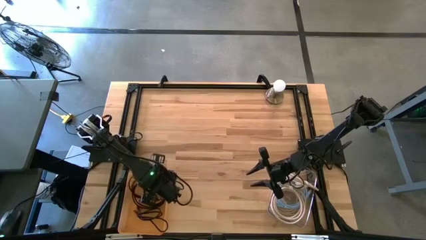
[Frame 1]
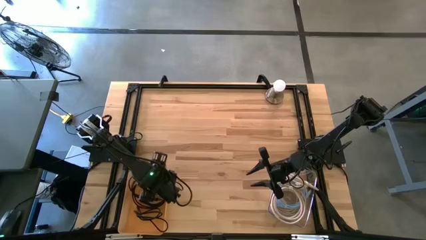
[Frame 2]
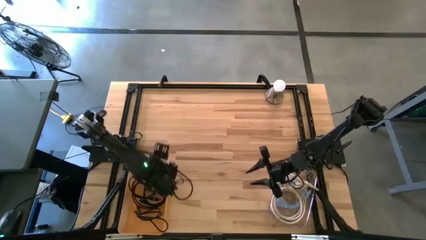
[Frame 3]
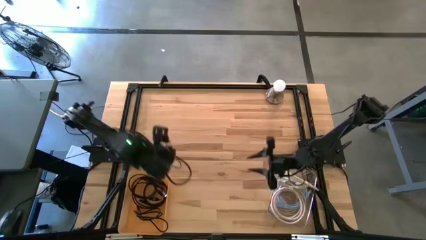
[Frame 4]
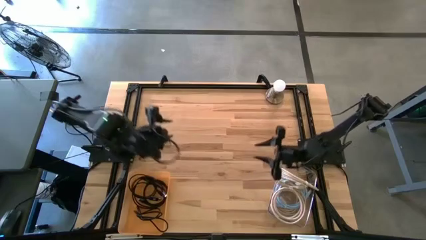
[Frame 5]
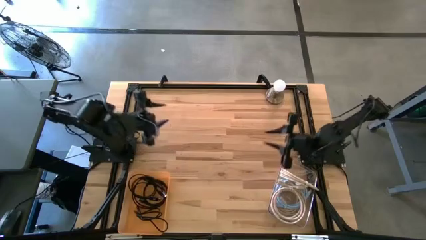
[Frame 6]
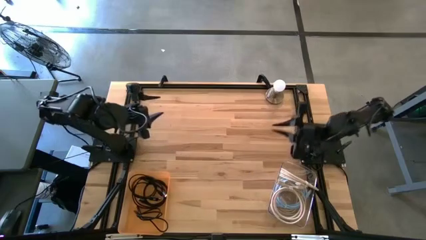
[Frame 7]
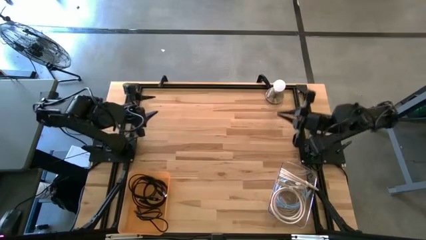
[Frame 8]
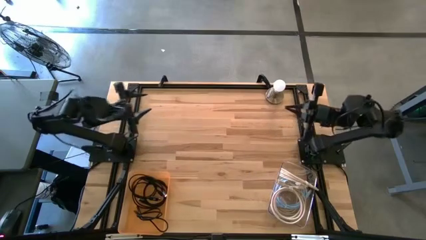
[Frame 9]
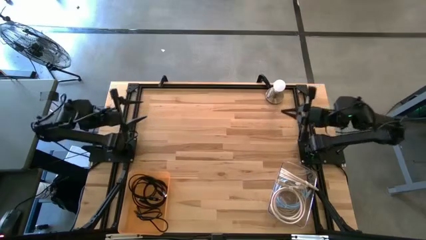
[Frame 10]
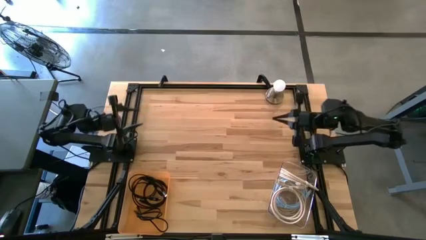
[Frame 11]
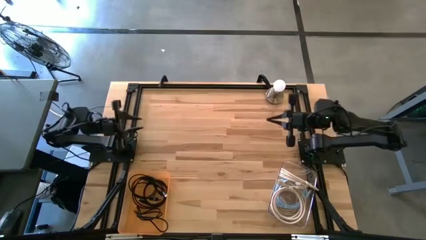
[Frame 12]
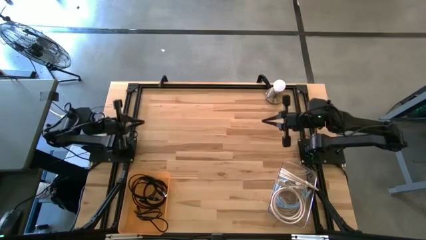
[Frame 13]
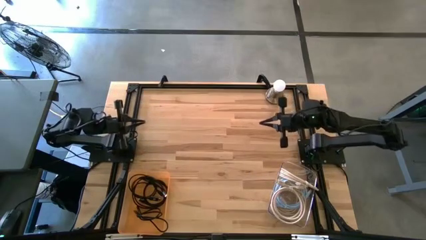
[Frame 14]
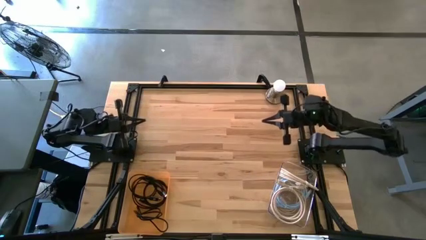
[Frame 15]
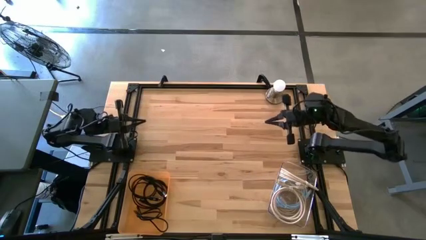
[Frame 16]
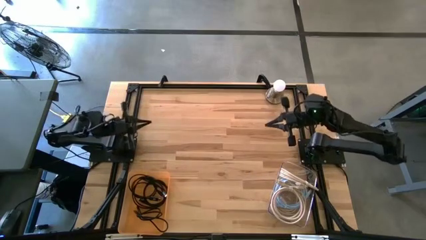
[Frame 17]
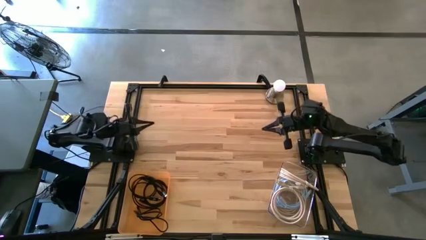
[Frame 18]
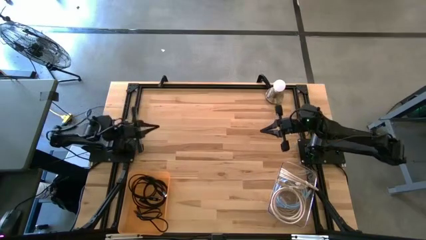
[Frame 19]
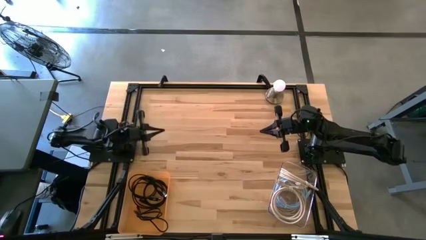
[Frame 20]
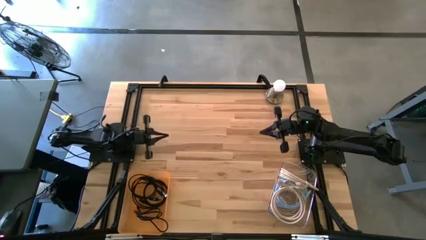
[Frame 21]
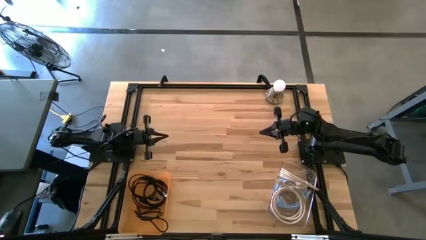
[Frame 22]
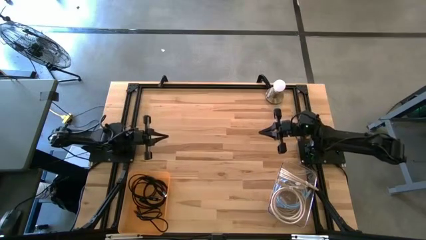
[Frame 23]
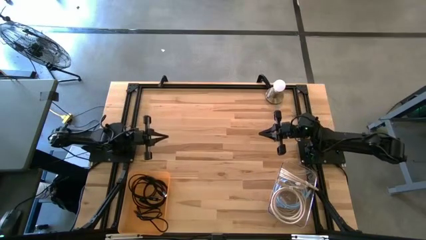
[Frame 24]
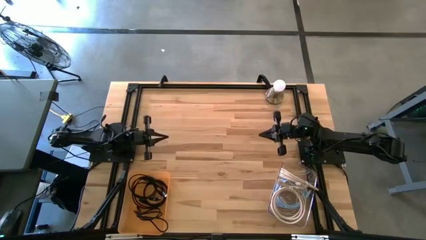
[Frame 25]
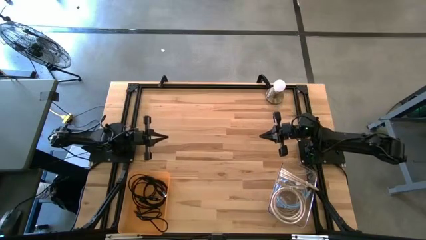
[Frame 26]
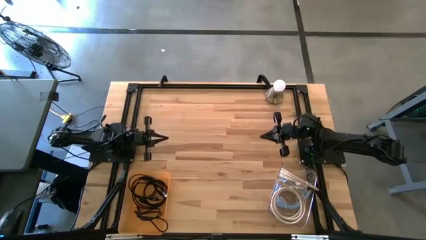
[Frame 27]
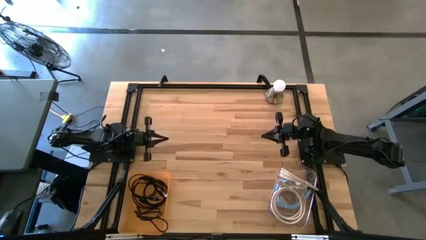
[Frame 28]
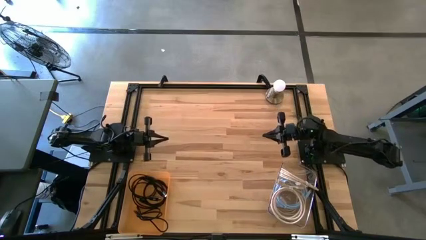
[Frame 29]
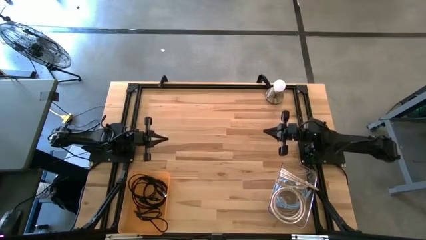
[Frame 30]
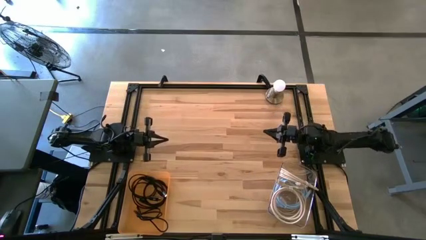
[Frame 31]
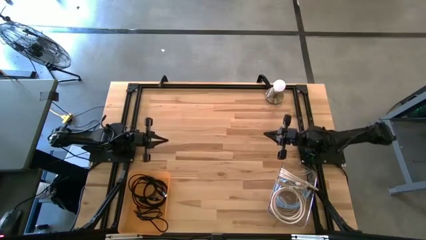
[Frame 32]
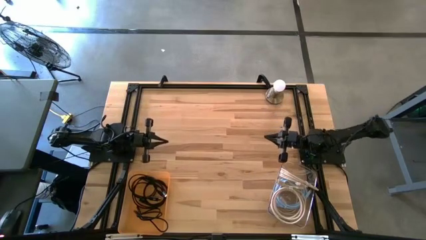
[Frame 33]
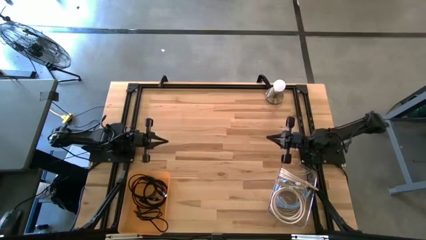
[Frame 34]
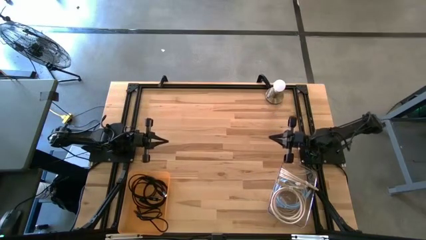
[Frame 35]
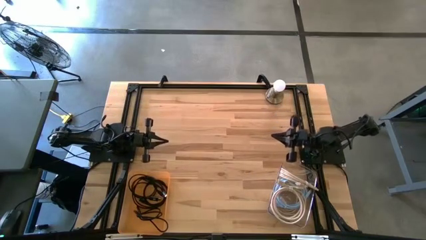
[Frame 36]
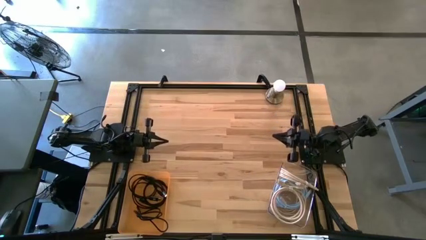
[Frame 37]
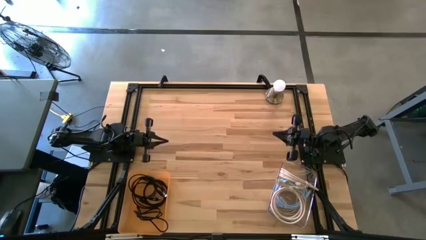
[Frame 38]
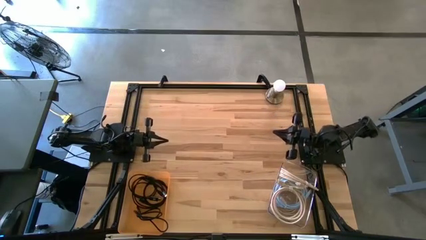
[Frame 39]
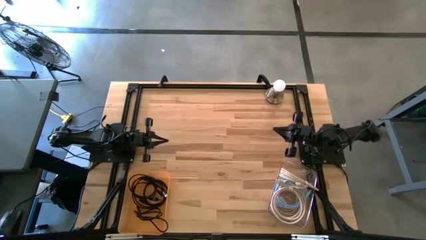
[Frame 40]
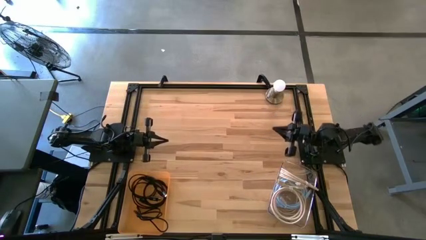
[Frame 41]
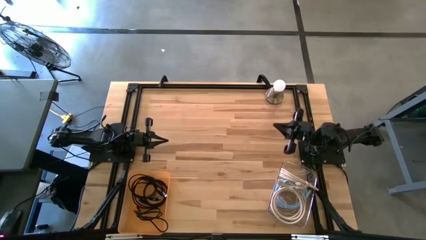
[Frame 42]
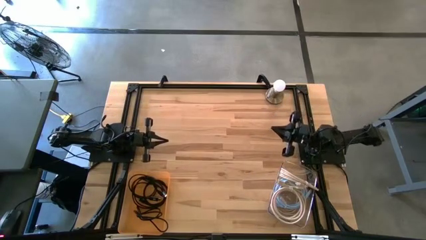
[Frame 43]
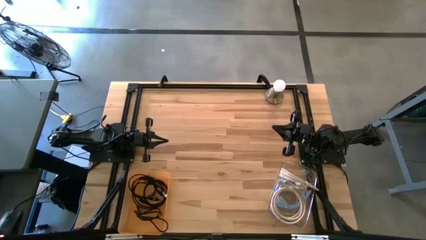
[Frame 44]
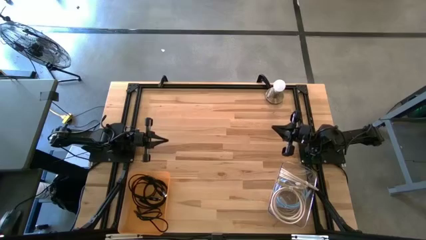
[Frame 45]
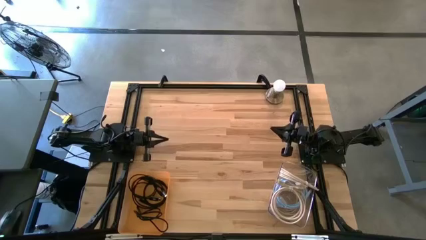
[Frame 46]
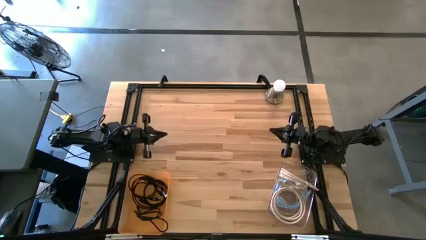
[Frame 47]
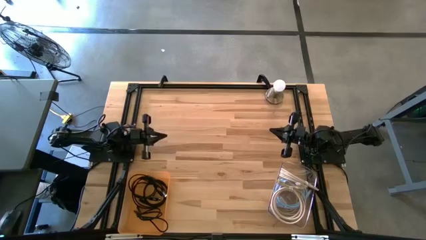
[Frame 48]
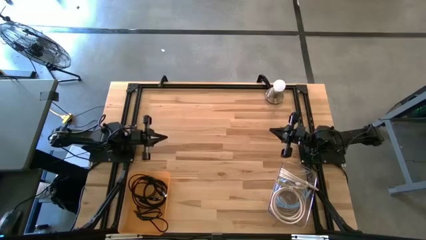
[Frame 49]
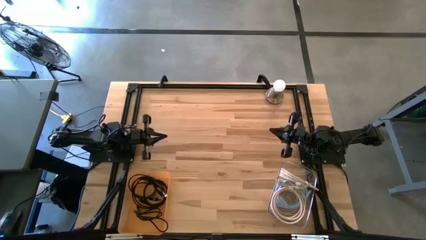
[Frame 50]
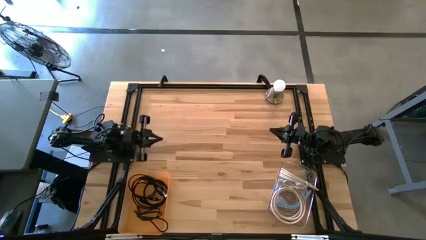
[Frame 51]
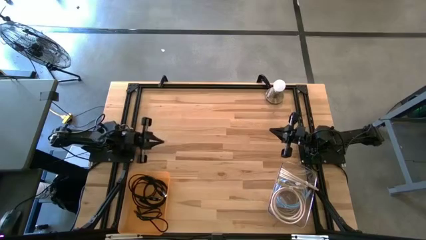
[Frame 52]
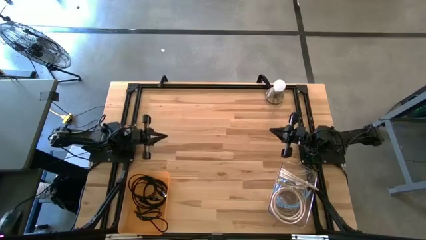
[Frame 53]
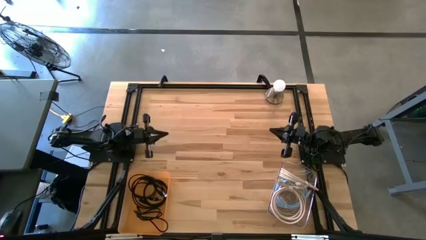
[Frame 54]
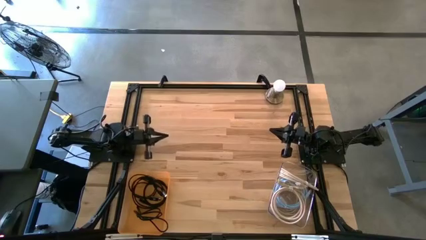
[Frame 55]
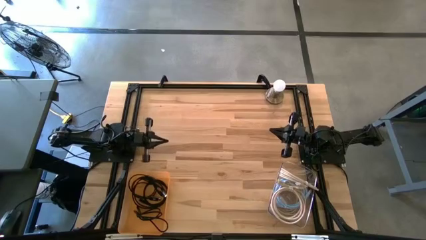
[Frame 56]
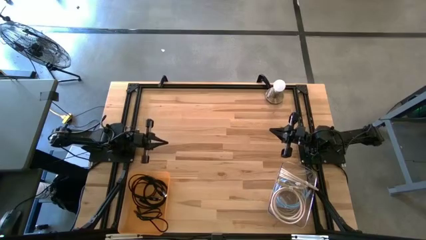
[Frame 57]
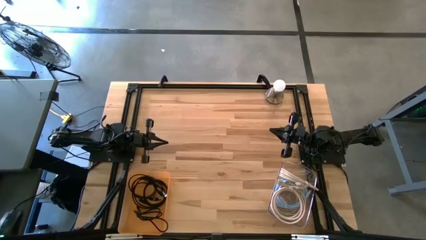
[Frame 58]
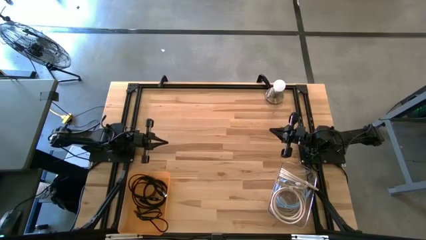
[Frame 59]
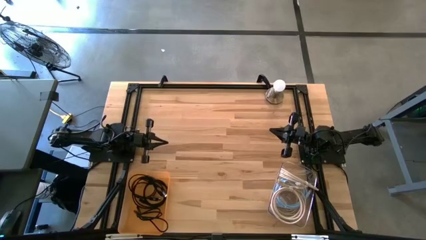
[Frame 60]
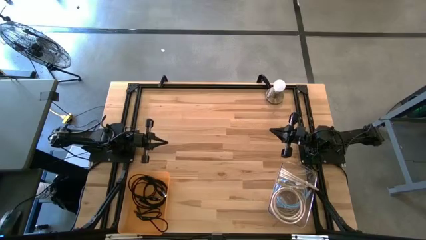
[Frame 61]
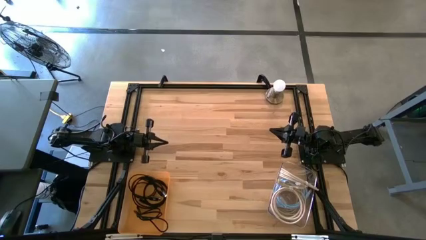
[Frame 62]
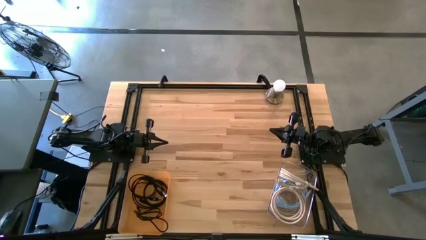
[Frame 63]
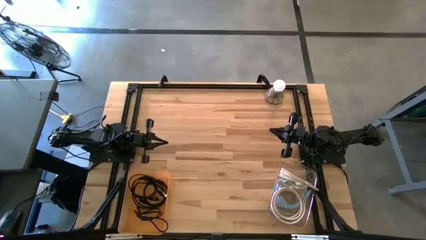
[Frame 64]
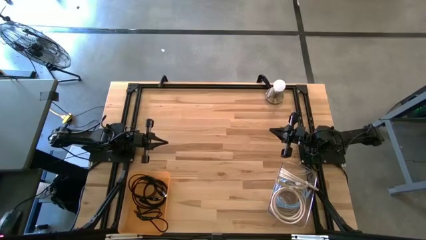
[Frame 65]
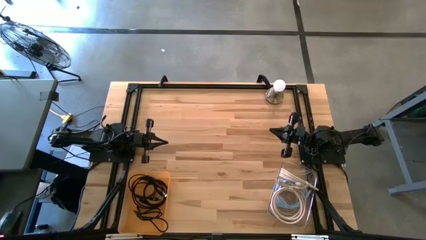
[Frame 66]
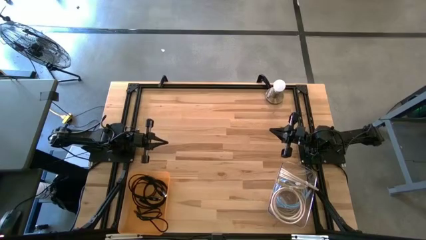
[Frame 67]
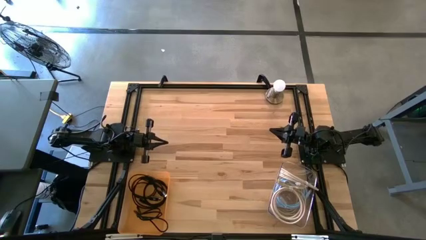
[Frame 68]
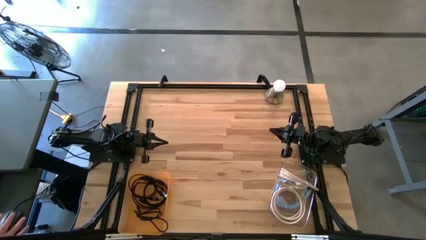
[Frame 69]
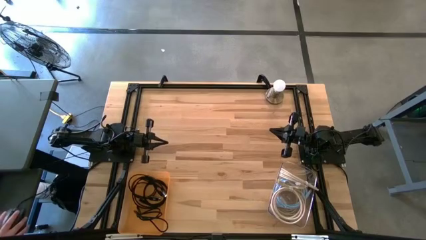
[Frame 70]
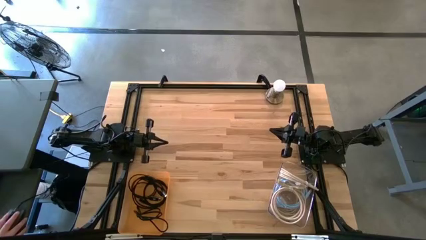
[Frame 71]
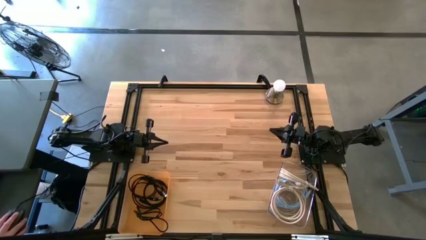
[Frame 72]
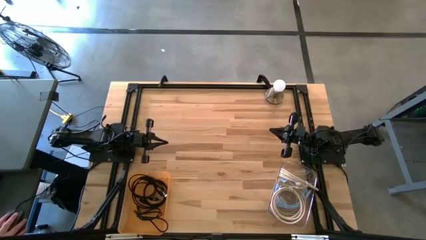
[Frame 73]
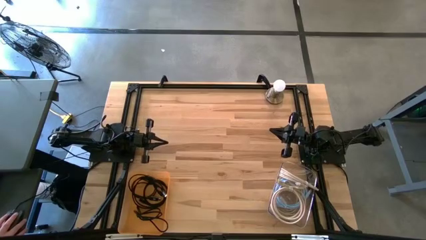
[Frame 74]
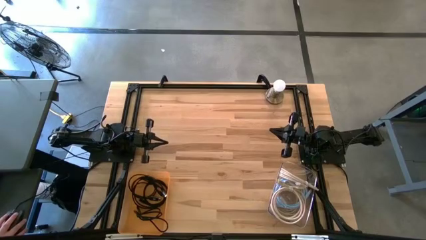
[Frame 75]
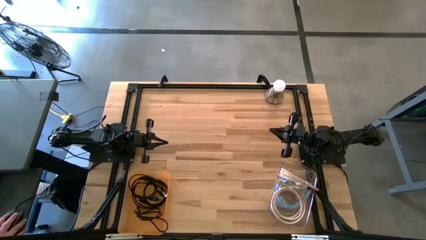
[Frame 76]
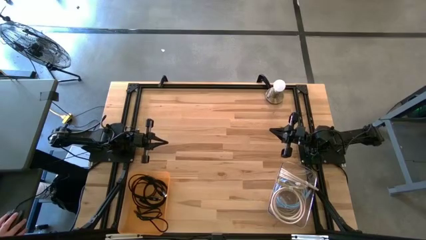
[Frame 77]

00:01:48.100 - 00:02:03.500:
Task: Sort HDMI cables
Return to Home Position
